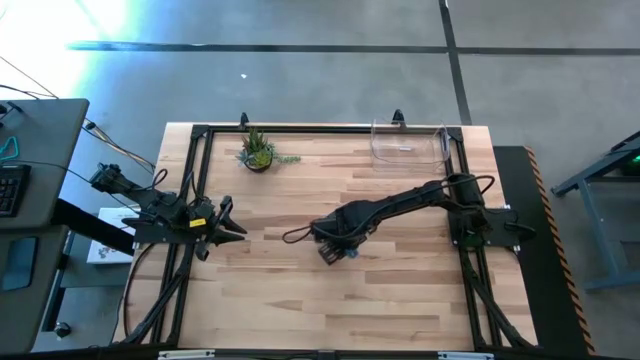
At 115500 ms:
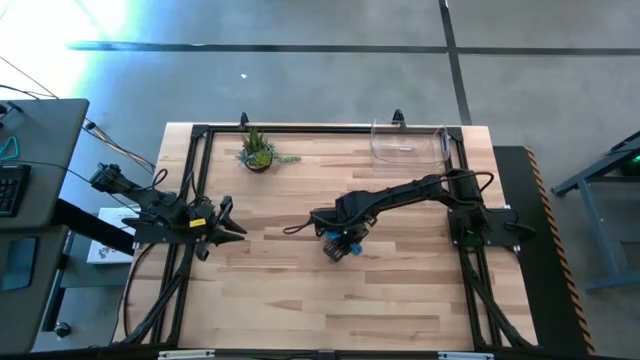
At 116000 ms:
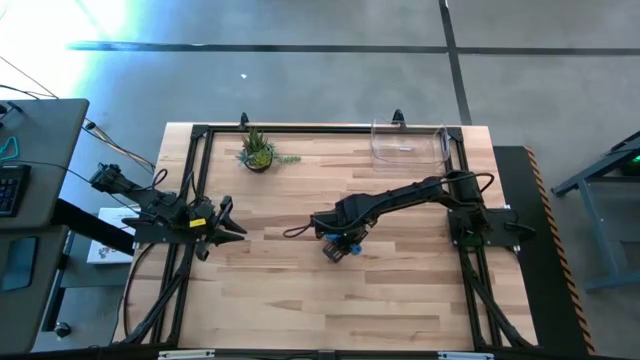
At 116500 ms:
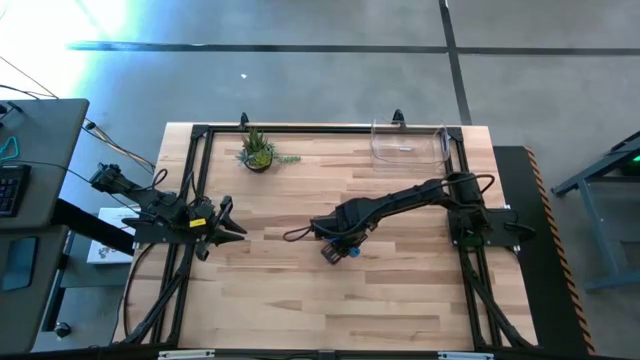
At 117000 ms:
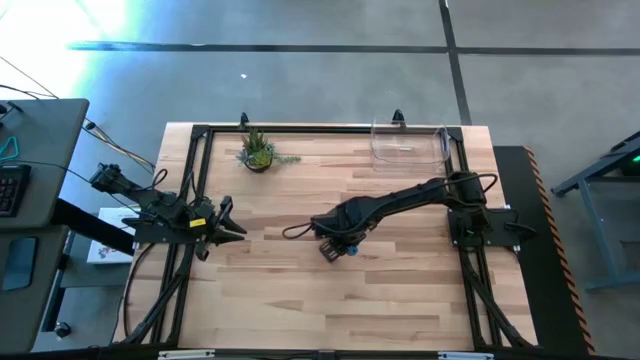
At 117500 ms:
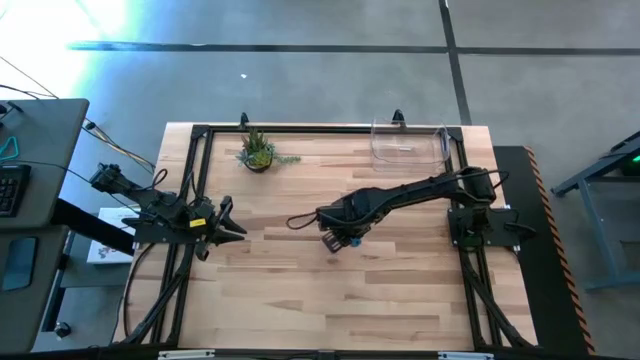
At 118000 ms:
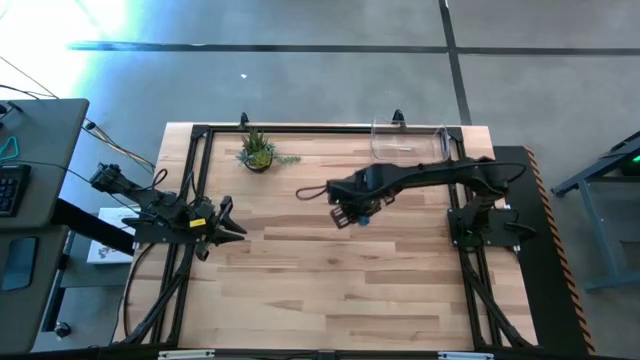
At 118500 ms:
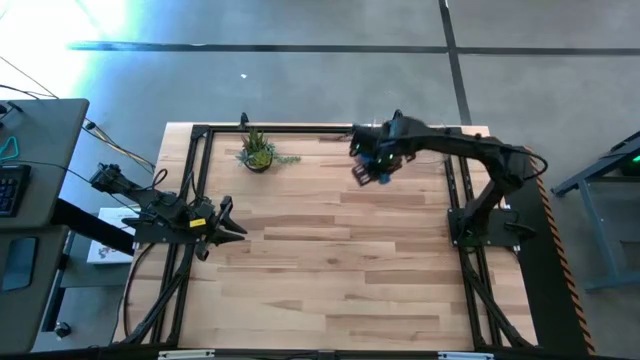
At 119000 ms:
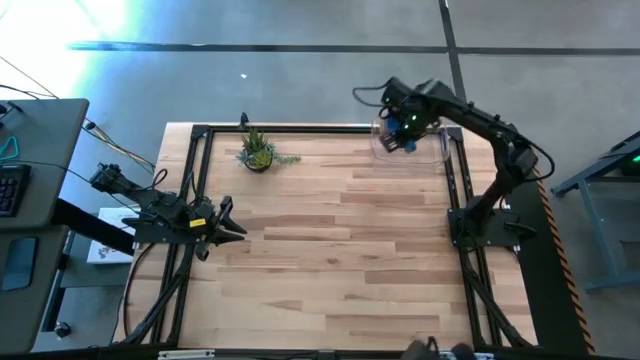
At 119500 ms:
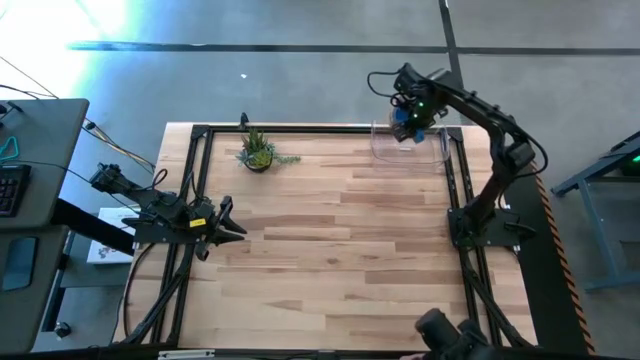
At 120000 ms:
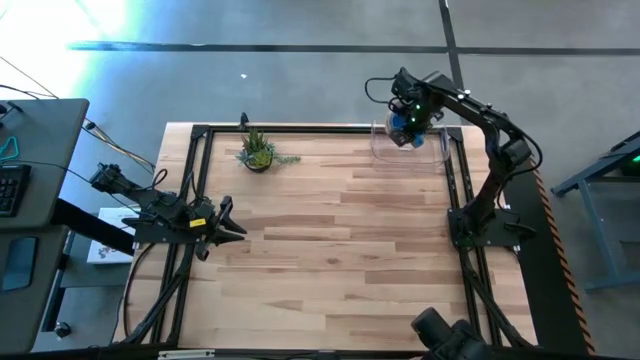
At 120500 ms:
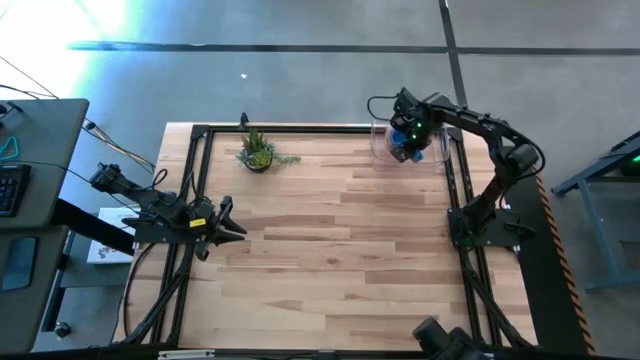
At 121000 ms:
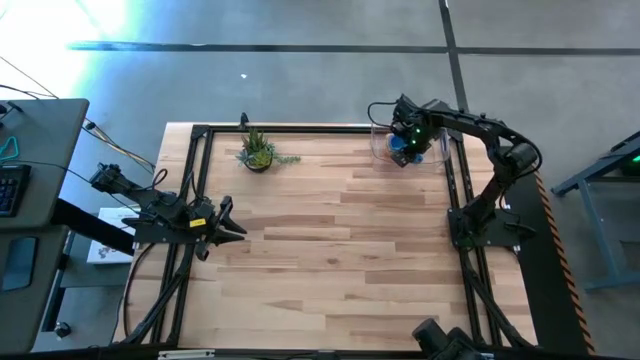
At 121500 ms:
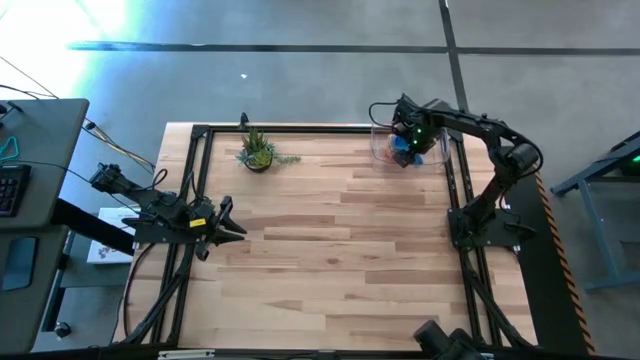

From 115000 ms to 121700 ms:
Task: Nest measuring cups in basket
Put the stacked measuring cups into the transparent bin

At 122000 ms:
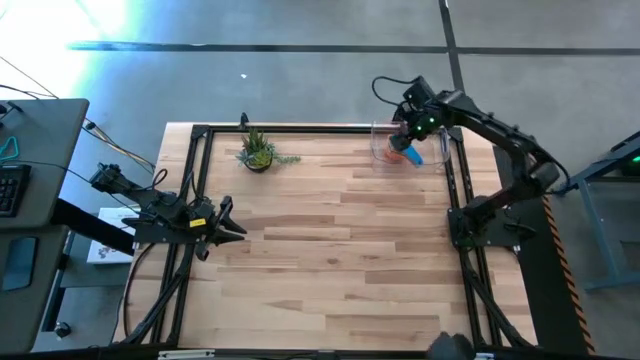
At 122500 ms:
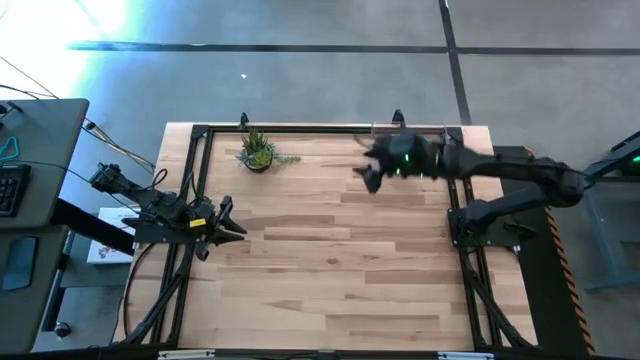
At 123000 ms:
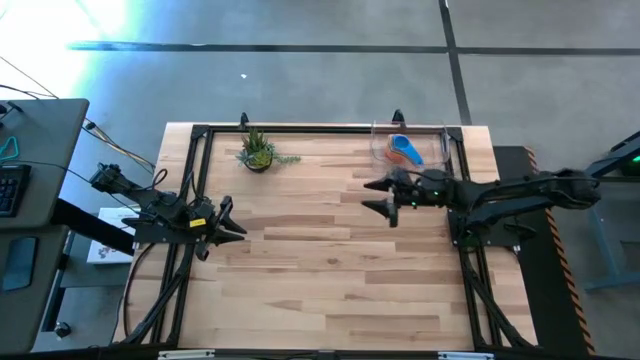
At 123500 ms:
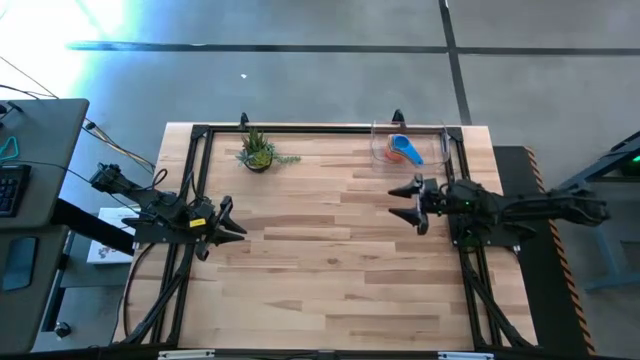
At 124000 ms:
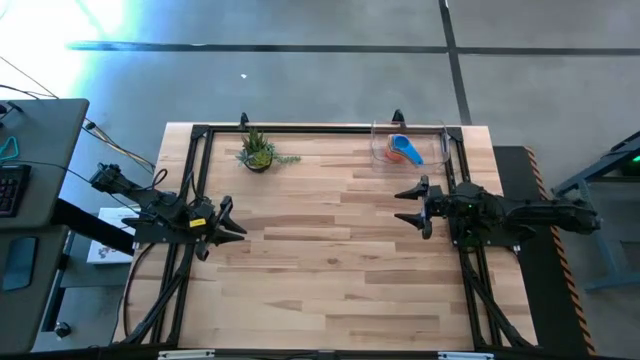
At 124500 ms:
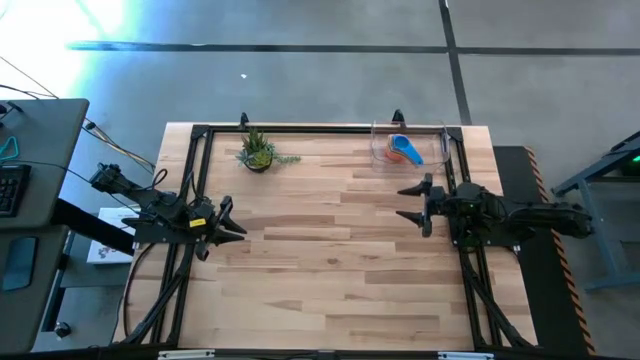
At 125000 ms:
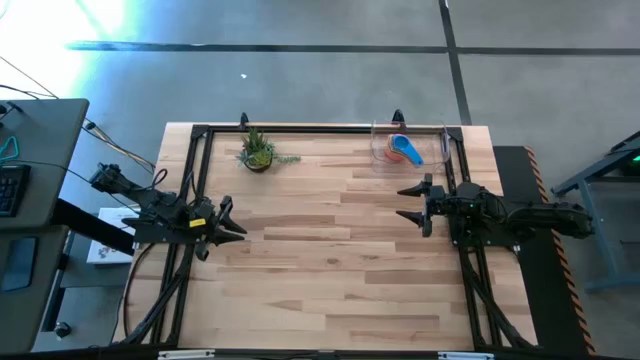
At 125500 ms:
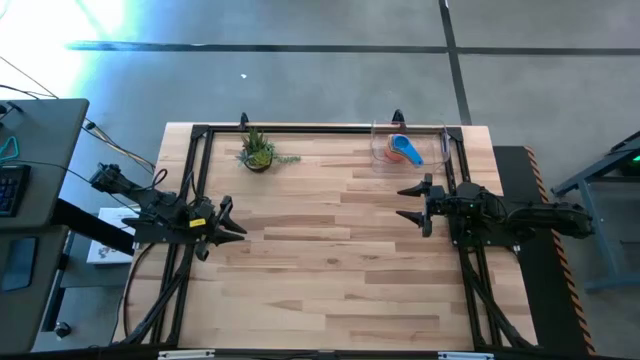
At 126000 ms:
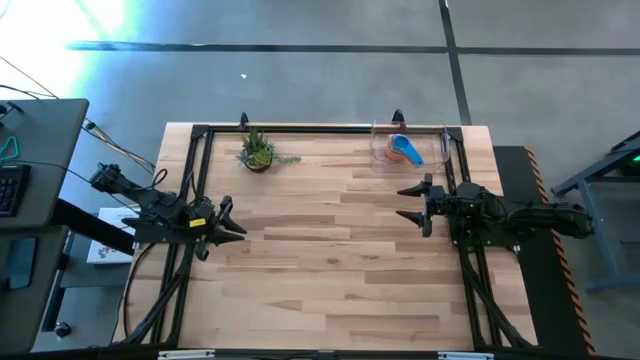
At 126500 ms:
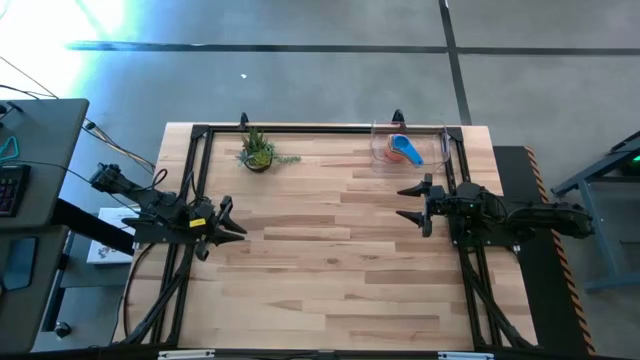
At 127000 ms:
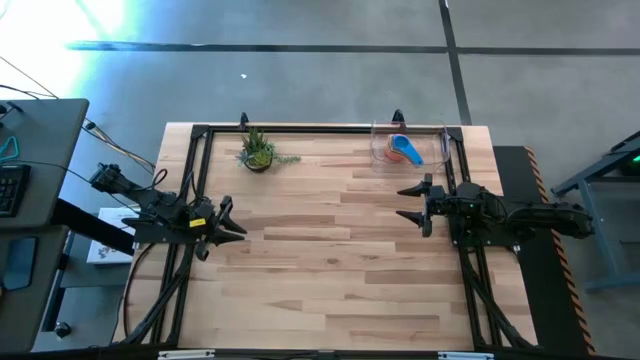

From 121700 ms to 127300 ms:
Return to Home Position

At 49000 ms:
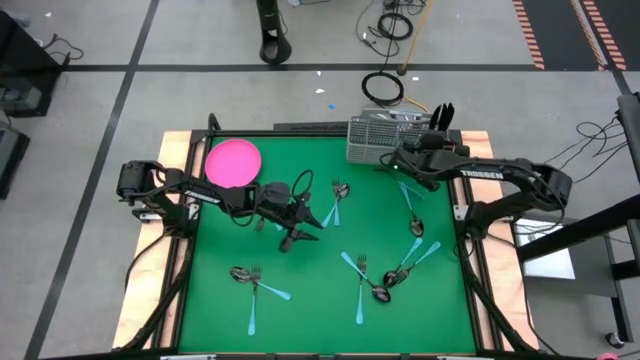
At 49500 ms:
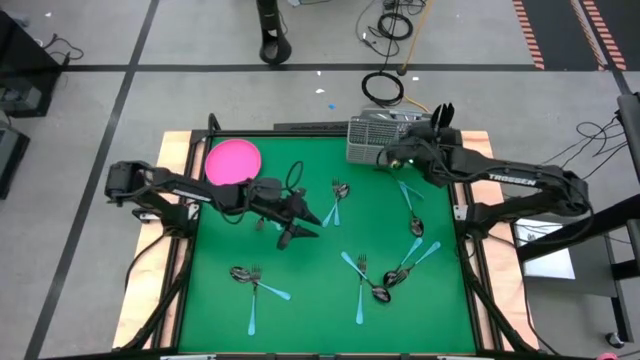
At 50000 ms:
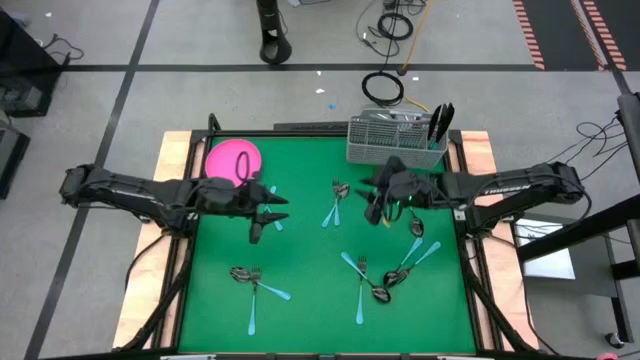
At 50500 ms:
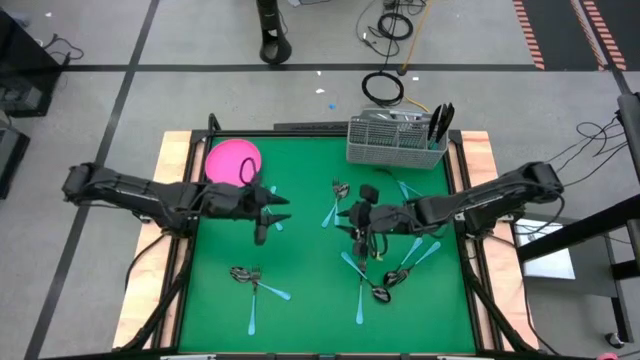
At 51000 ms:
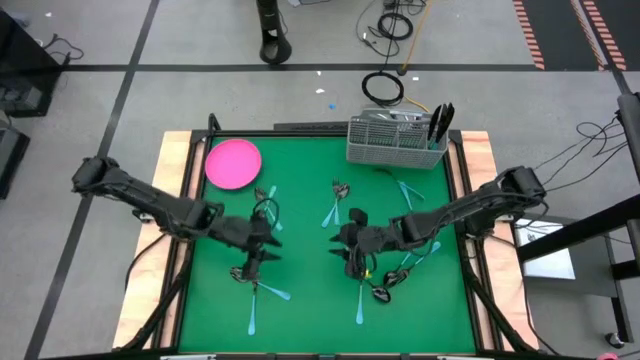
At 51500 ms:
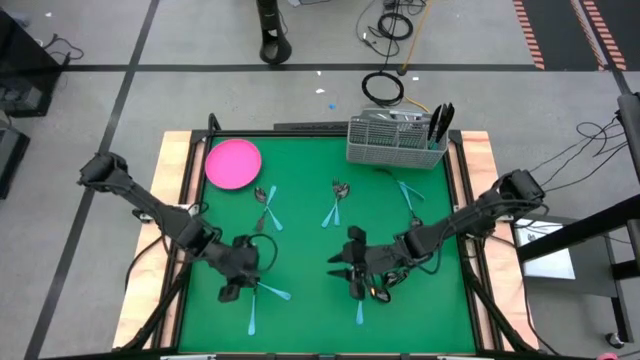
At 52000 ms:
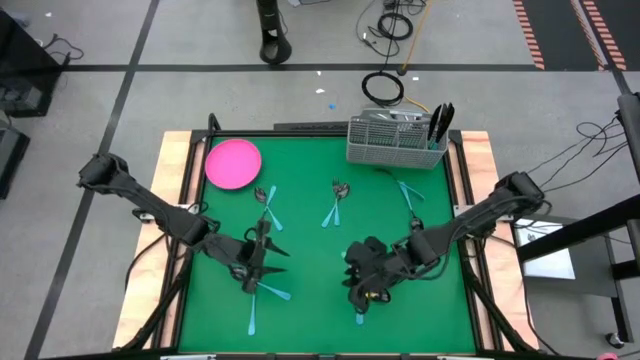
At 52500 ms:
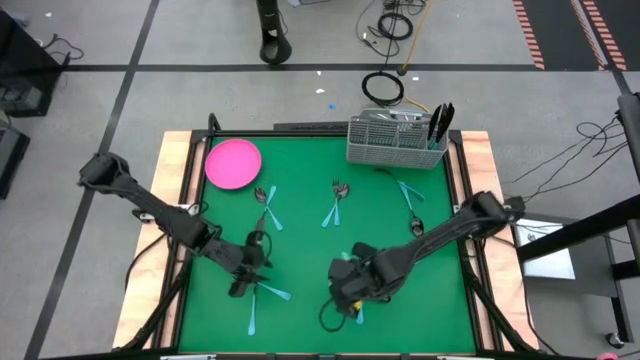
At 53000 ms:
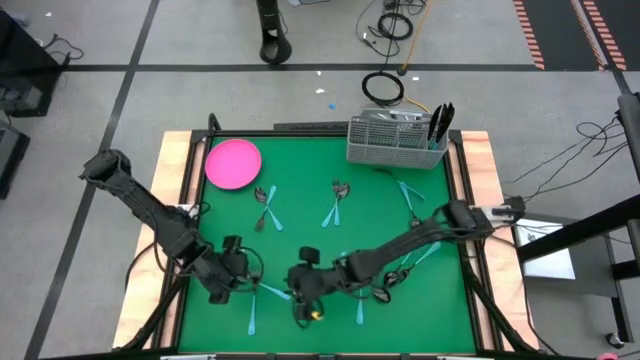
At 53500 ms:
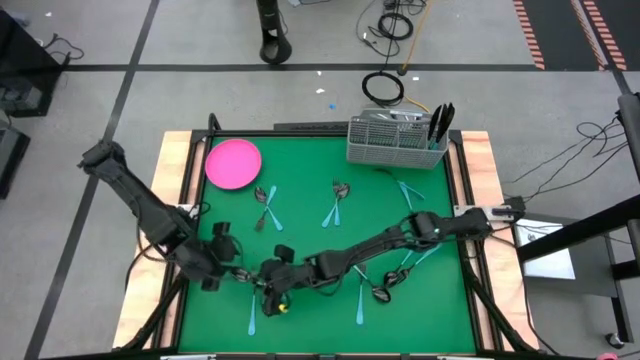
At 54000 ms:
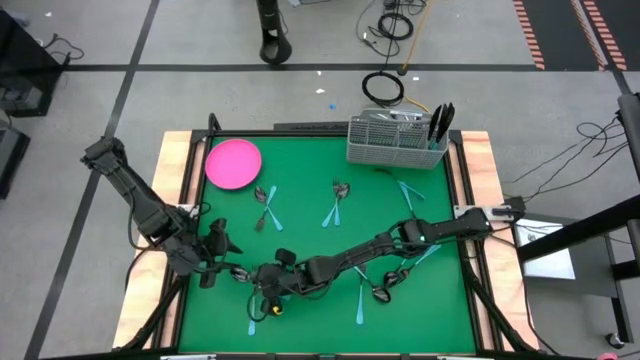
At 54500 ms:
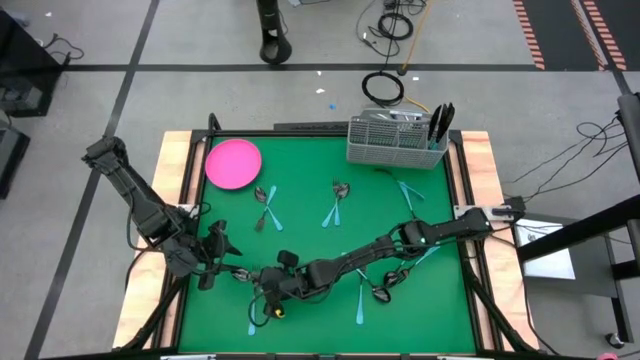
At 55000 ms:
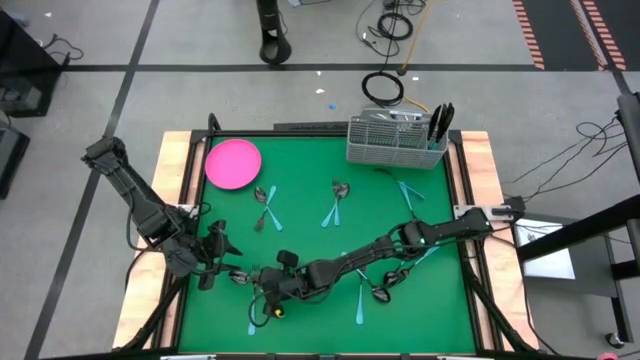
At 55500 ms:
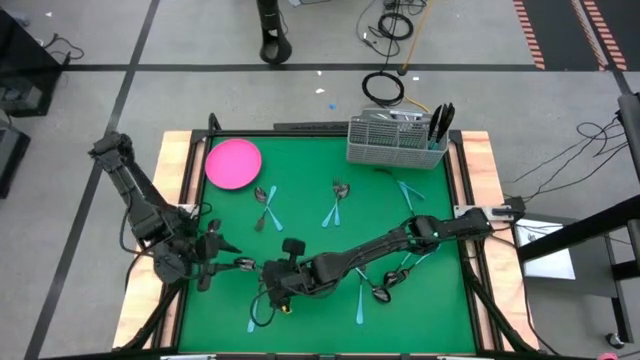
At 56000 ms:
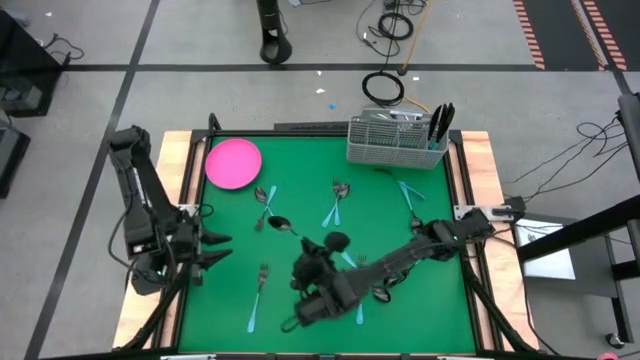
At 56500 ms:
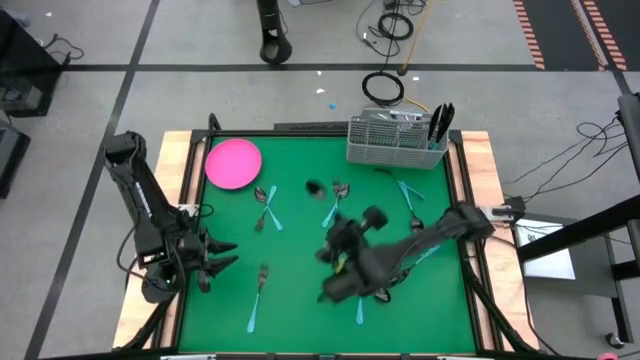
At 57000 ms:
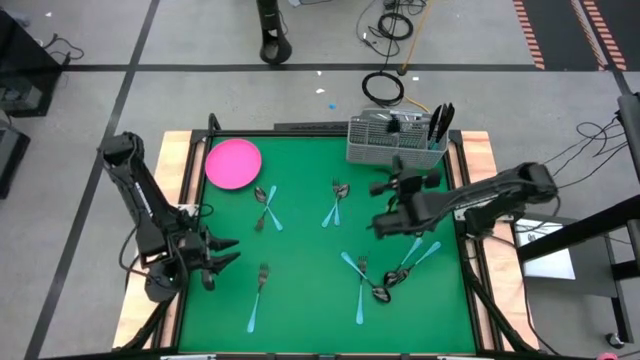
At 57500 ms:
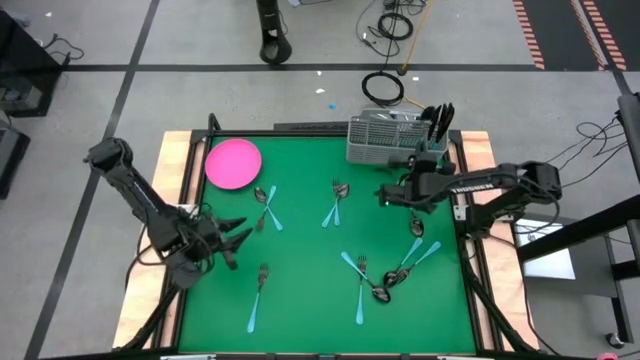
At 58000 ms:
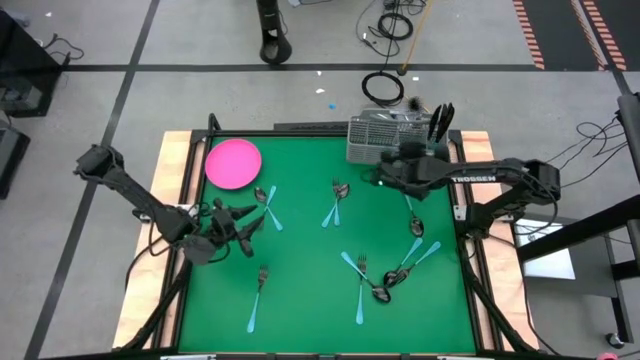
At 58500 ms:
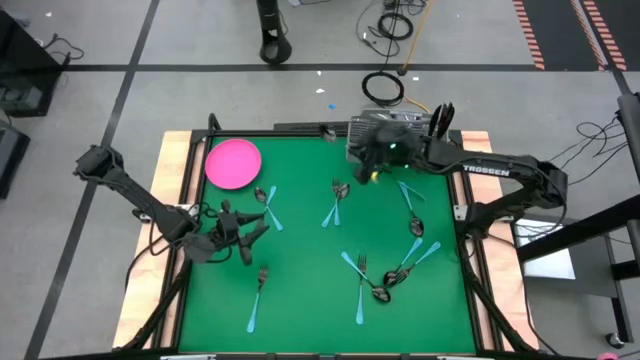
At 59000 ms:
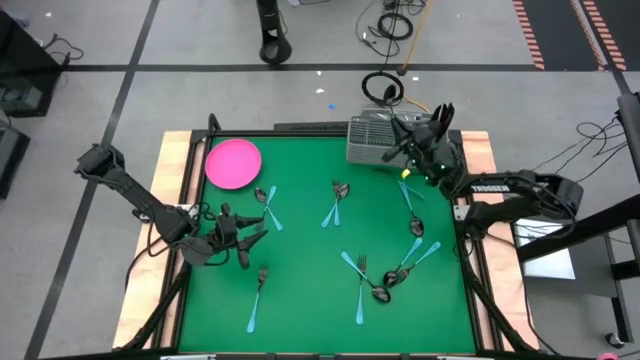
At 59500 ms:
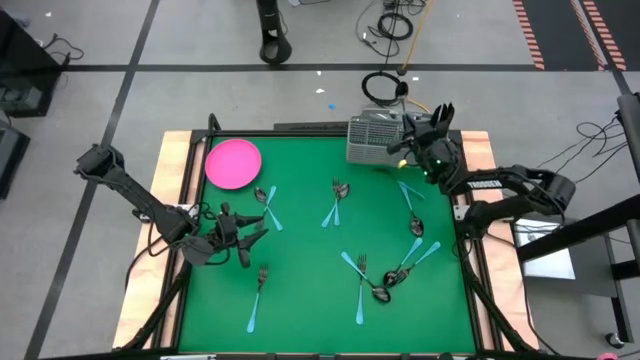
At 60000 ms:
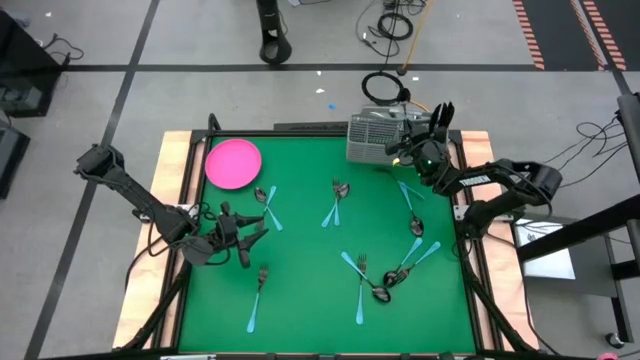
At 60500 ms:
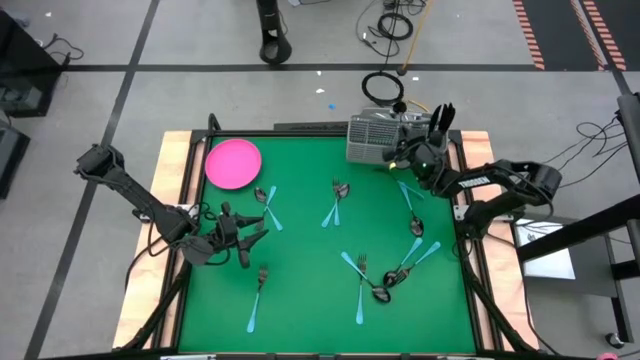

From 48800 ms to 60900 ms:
Task: Sort silverware
Put the blue spoon into the gray silverware basket
